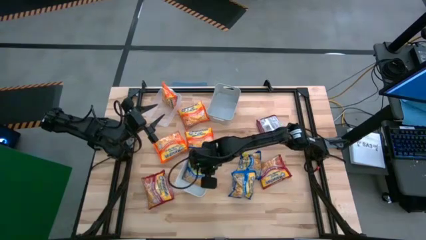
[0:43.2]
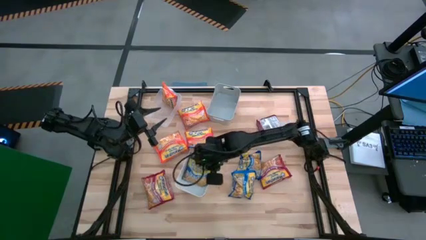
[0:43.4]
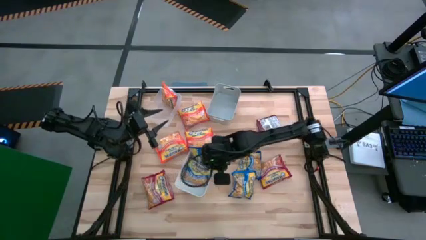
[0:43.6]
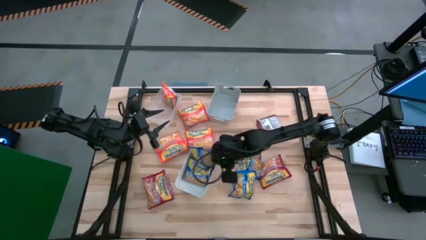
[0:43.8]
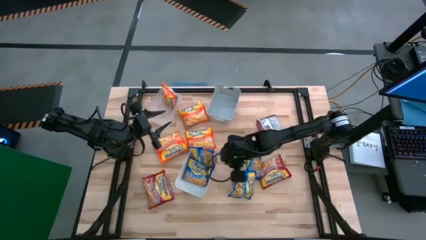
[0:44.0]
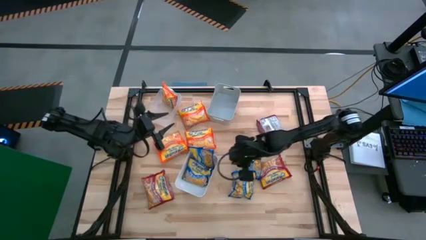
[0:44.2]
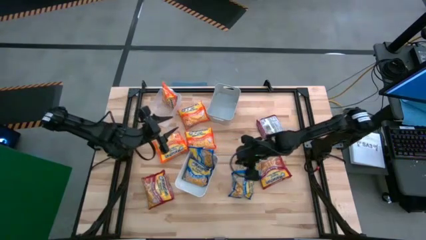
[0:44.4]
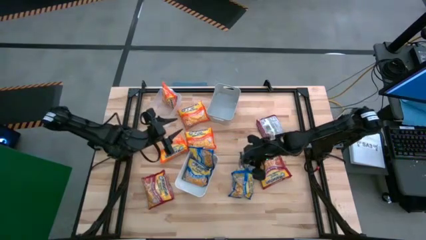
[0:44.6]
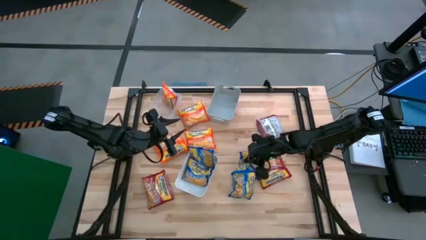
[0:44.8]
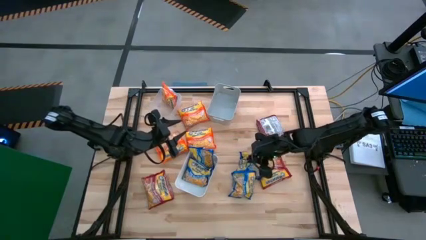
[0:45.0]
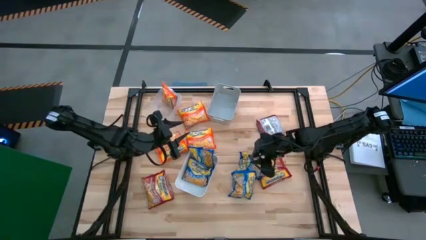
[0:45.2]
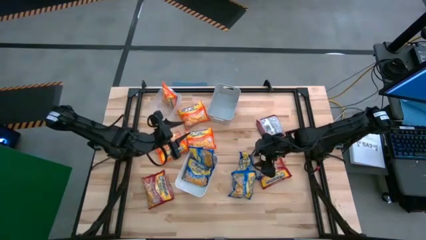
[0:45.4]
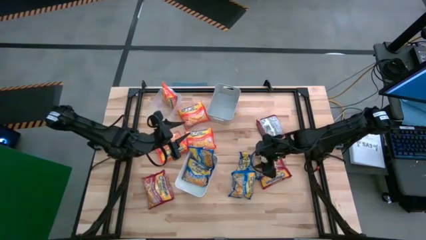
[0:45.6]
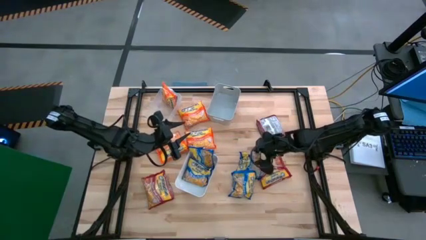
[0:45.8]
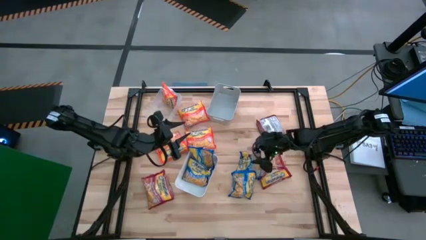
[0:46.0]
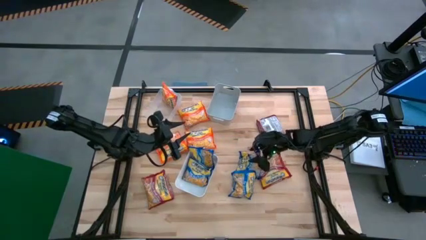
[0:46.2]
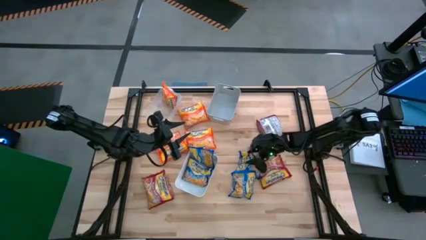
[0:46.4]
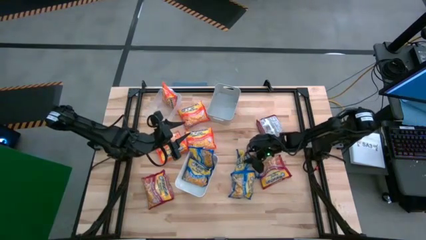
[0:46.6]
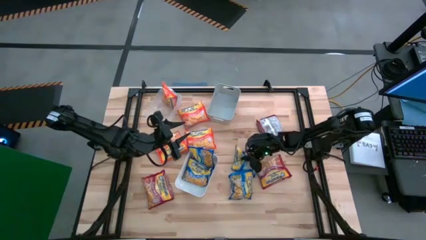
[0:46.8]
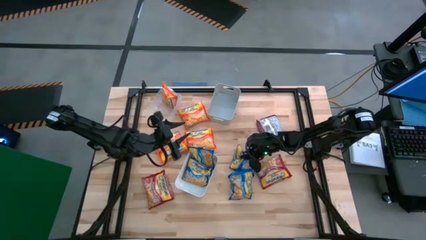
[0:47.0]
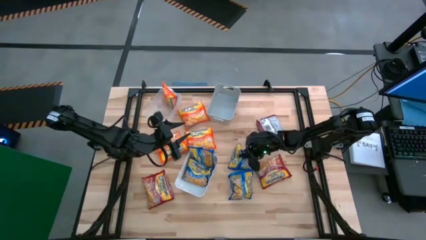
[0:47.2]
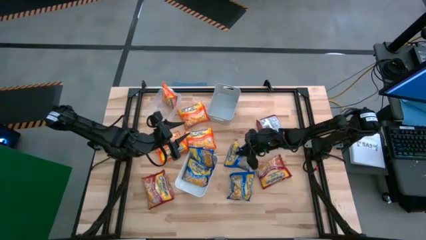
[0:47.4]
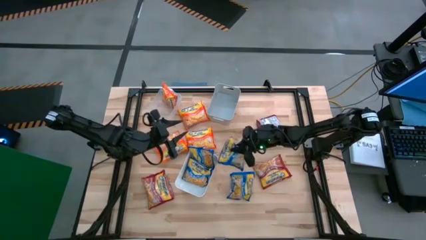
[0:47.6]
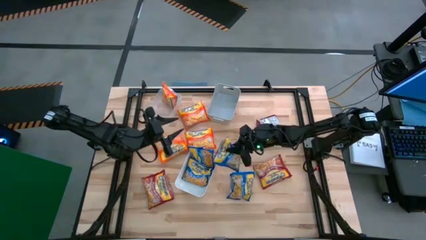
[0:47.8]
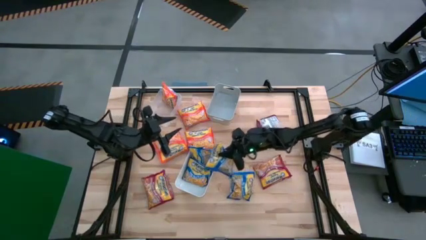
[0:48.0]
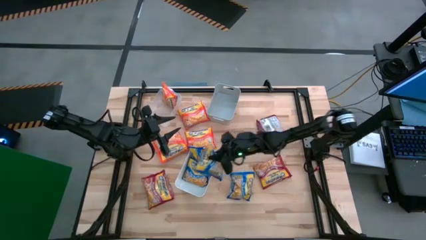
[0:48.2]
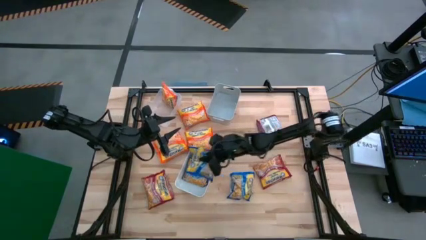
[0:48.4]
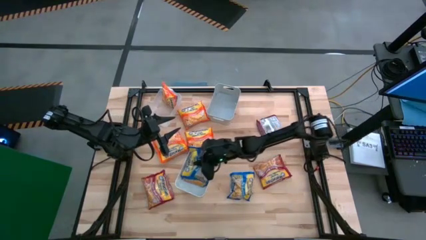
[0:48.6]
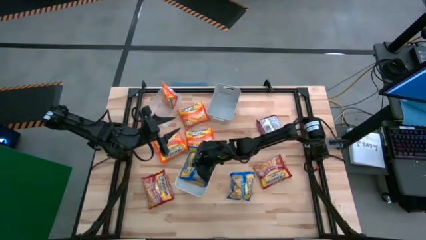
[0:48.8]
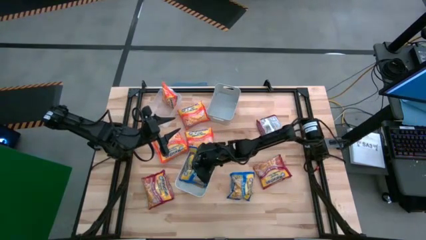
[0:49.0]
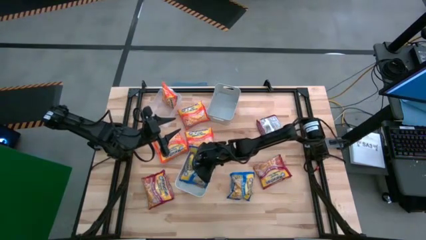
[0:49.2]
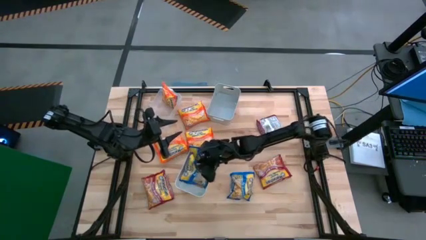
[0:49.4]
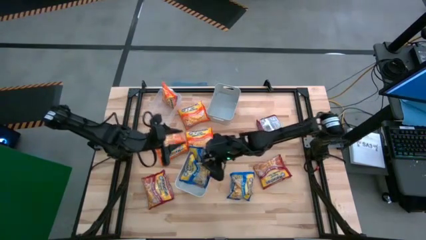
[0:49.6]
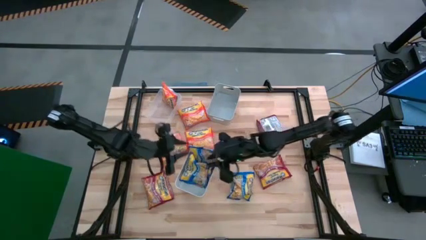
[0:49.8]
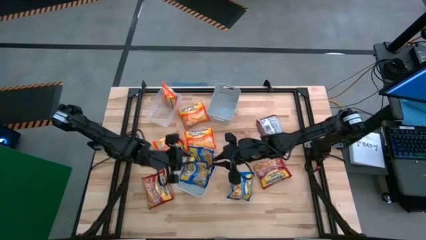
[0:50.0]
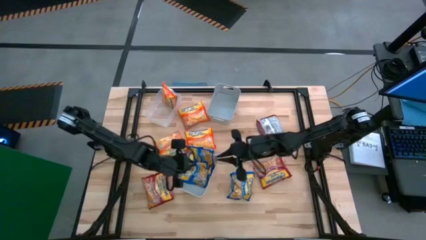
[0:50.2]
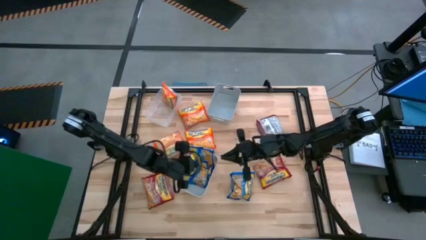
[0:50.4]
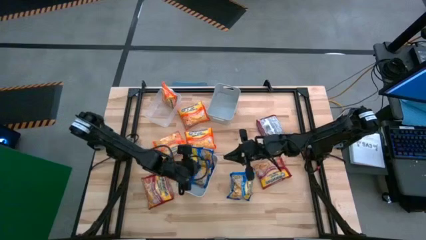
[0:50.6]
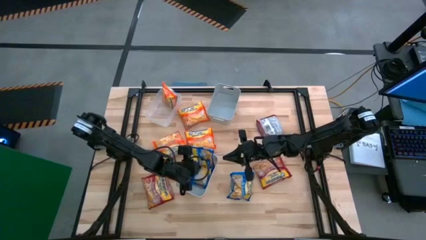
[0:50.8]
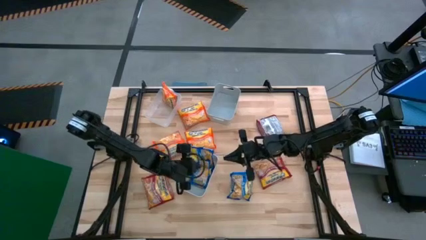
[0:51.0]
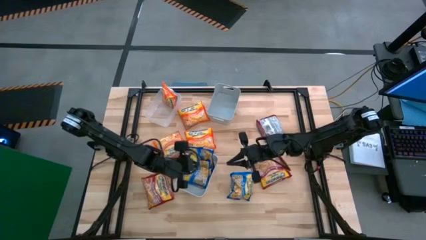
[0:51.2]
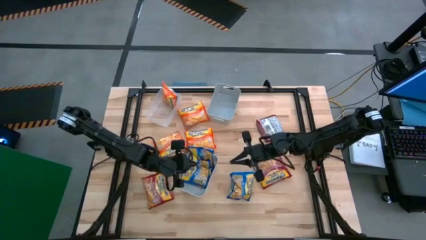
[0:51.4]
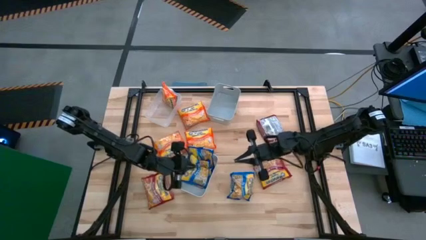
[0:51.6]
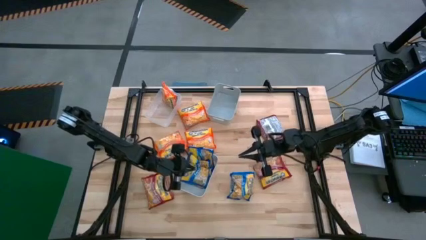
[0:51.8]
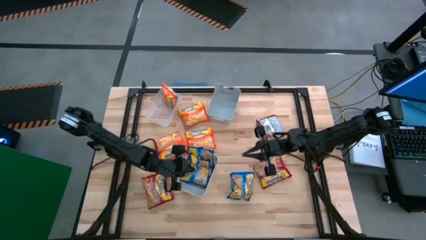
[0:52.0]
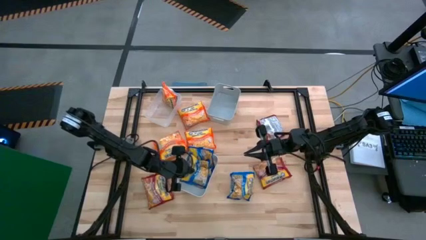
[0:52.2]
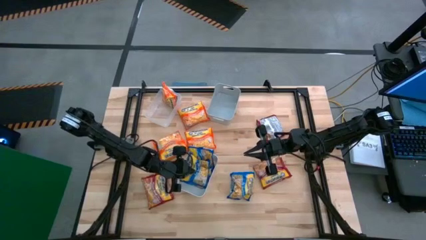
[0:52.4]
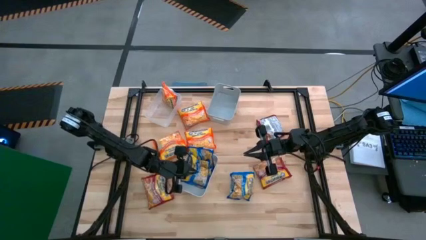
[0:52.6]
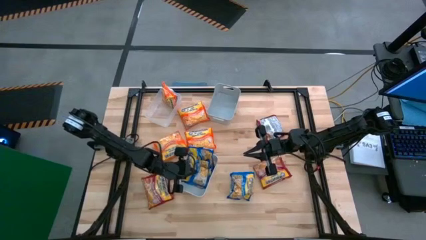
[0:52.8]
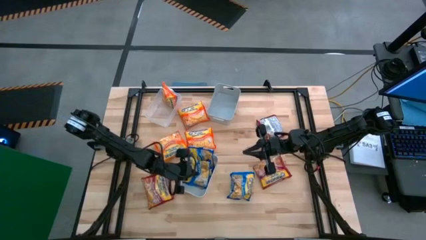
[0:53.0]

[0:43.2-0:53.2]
Task: Sort Maruchan noodles
Put the blue noodle pack into the white bin

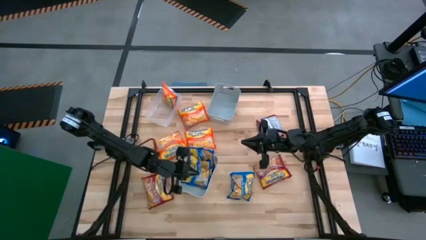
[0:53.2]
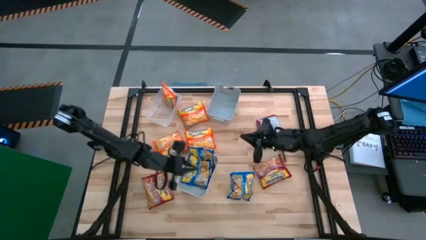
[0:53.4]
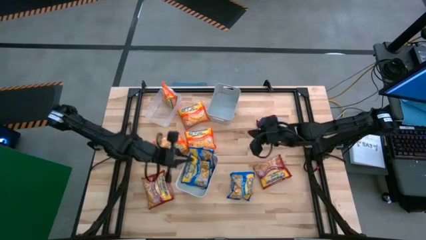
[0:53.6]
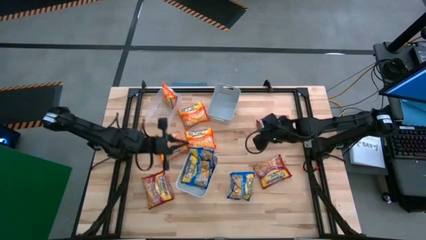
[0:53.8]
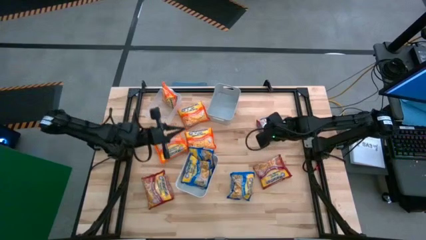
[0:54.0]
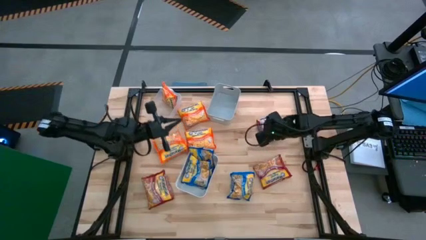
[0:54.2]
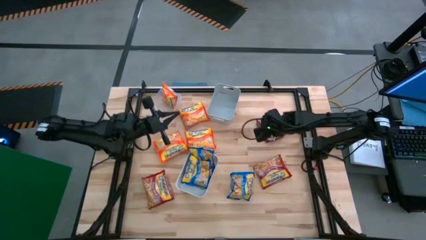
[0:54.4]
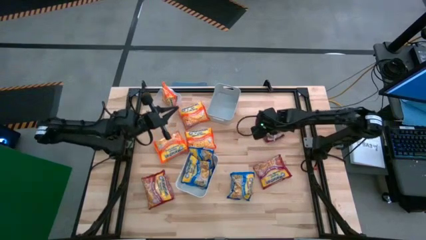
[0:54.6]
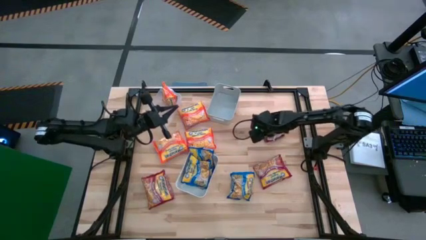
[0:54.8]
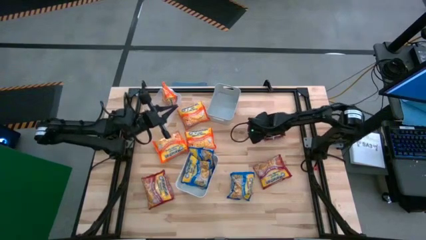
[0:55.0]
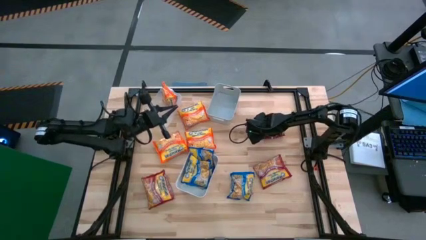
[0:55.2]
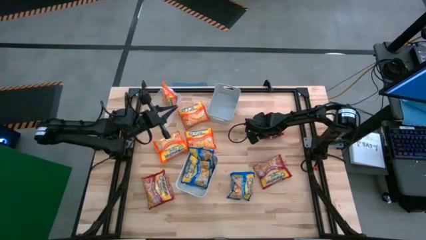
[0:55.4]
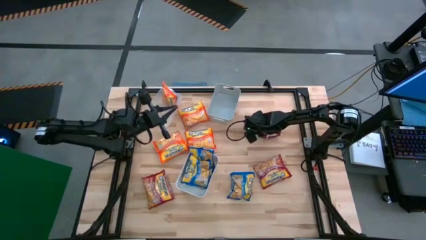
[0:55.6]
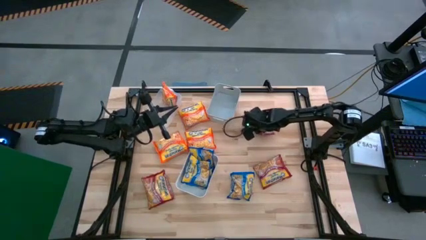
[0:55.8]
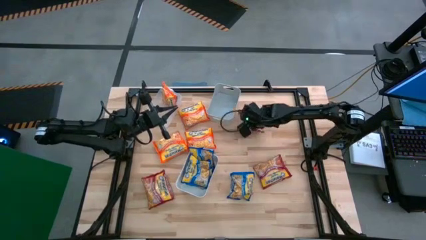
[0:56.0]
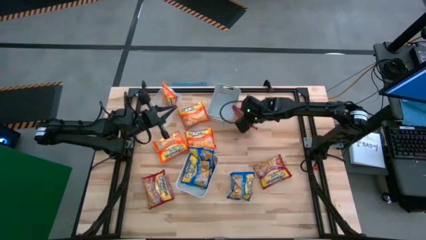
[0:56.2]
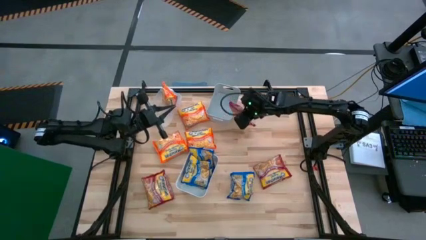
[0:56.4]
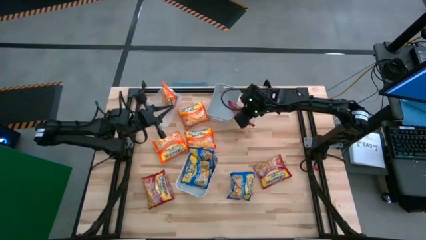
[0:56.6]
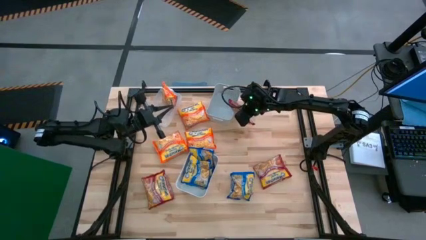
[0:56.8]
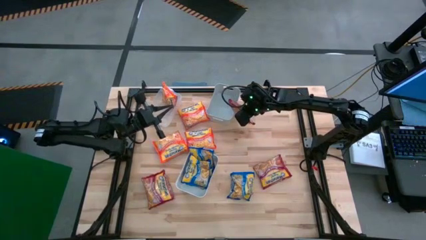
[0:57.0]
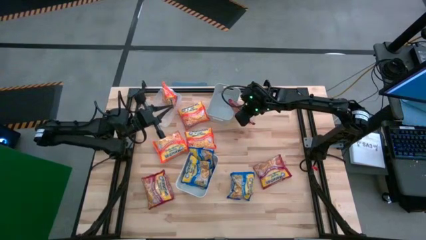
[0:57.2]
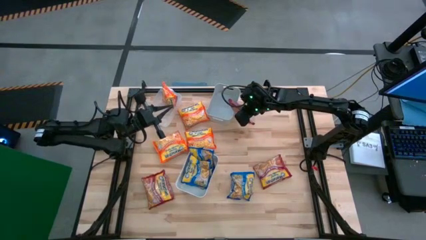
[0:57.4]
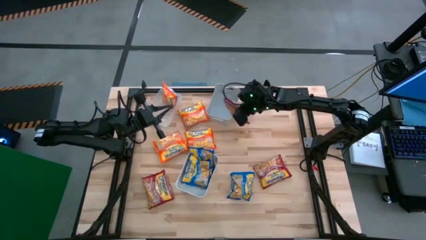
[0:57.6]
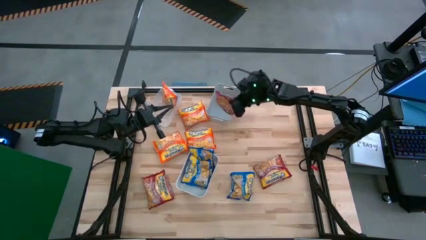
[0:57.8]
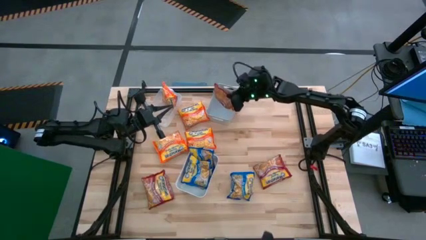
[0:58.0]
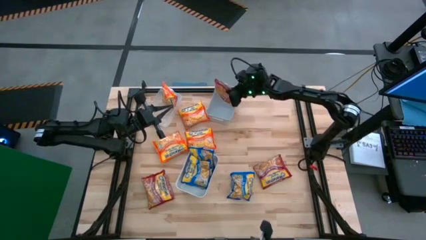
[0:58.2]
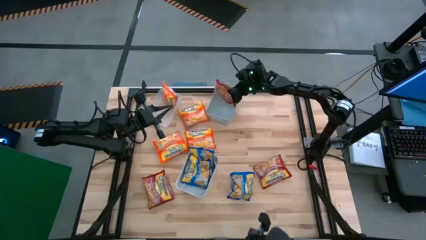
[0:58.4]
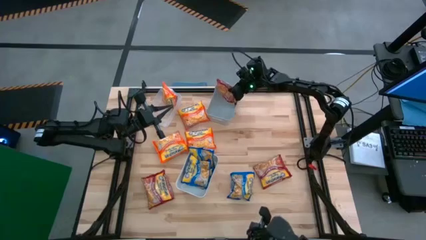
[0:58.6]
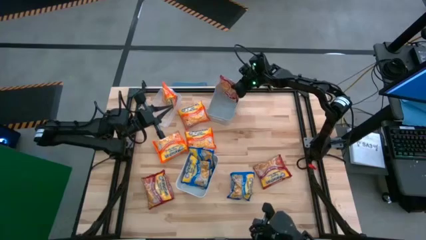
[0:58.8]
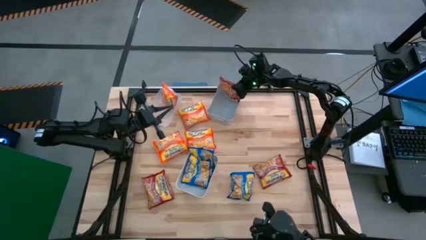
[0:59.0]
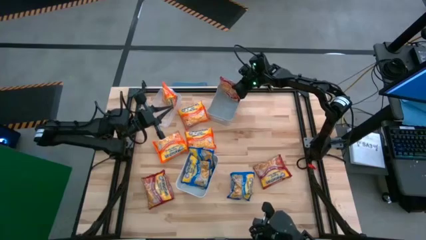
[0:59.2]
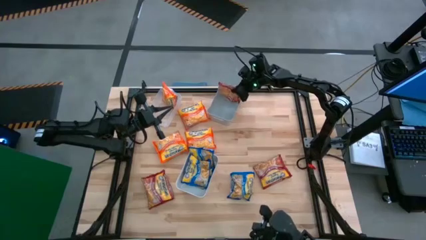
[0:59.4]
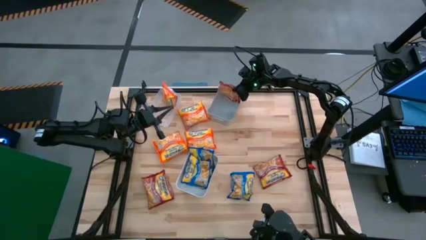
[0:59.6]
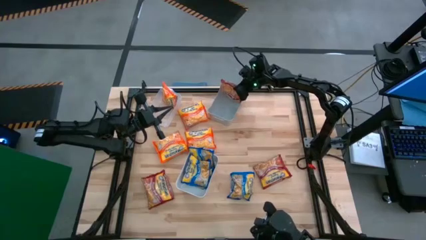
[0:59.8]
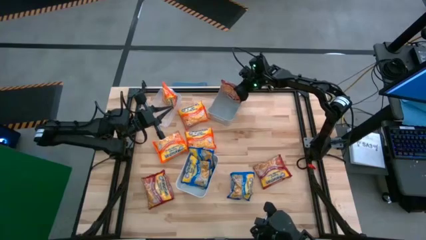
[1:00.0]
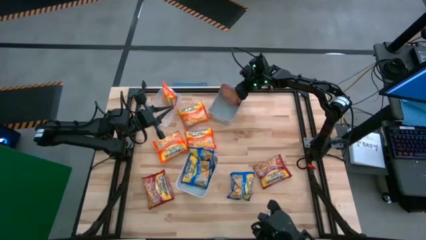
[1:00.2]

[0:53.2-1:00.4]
Put the top red noodle pack into the gray bin
